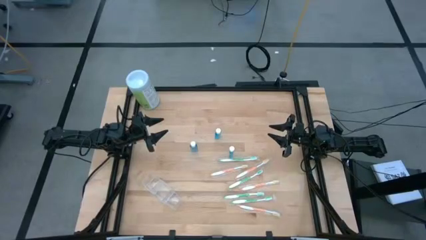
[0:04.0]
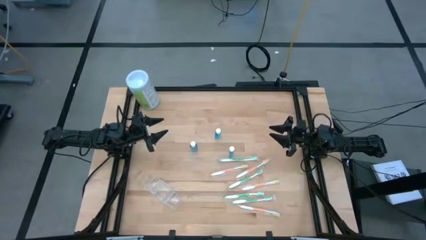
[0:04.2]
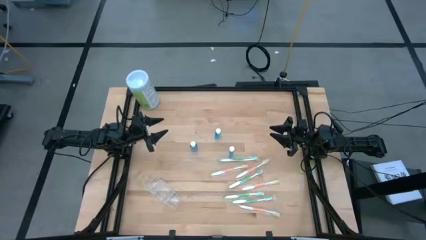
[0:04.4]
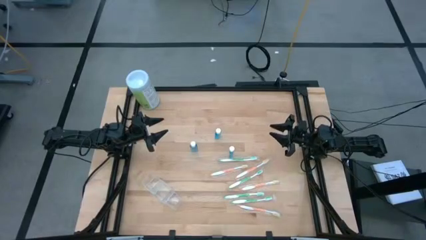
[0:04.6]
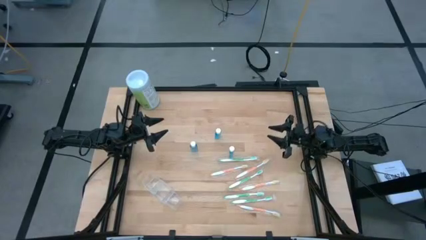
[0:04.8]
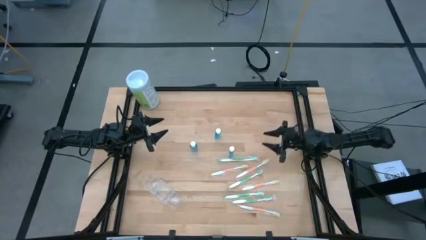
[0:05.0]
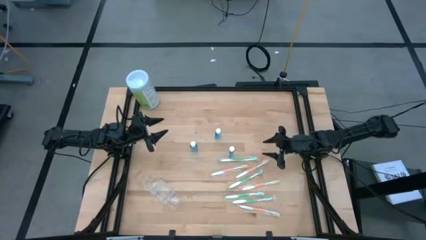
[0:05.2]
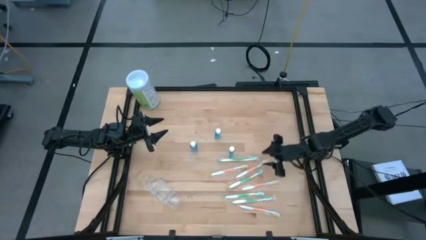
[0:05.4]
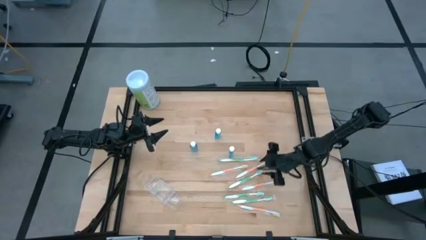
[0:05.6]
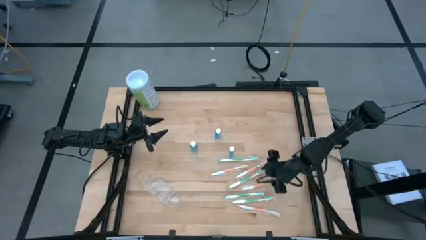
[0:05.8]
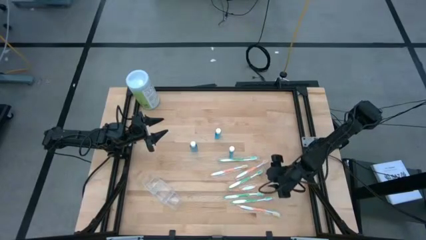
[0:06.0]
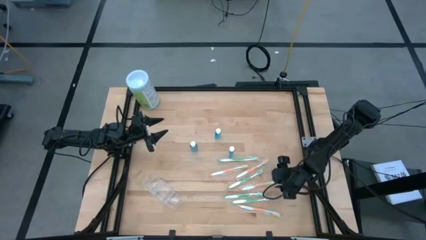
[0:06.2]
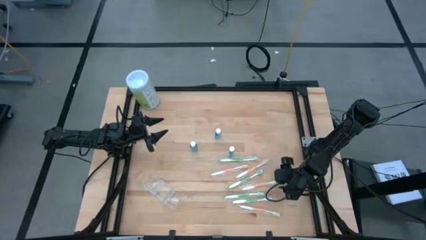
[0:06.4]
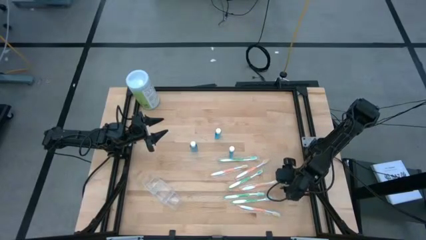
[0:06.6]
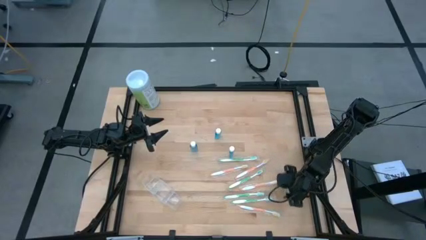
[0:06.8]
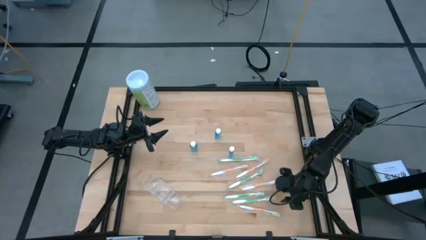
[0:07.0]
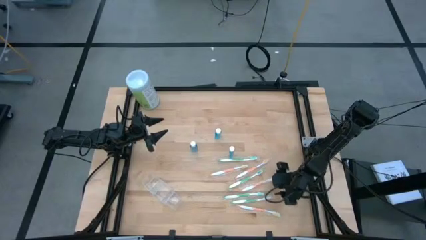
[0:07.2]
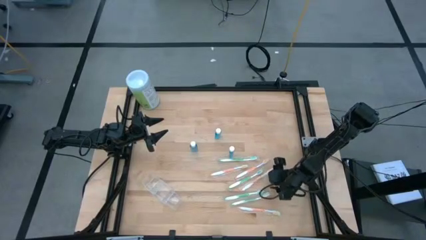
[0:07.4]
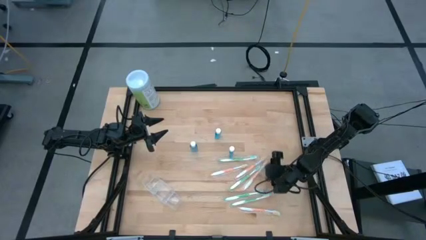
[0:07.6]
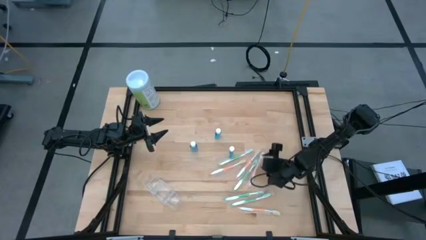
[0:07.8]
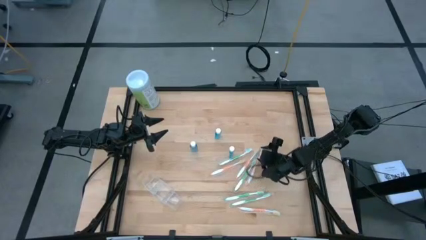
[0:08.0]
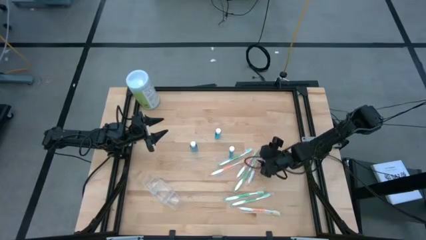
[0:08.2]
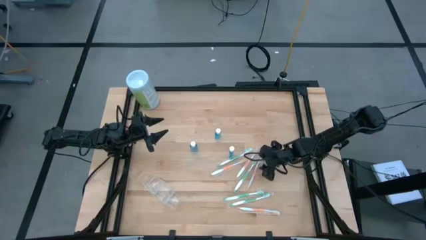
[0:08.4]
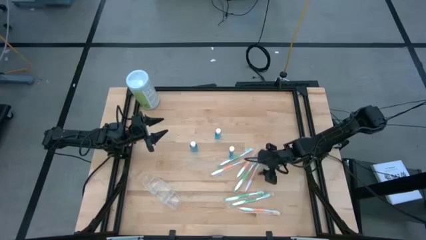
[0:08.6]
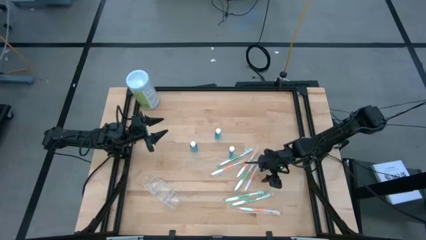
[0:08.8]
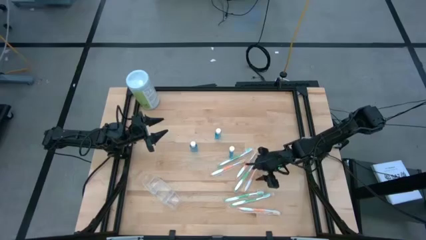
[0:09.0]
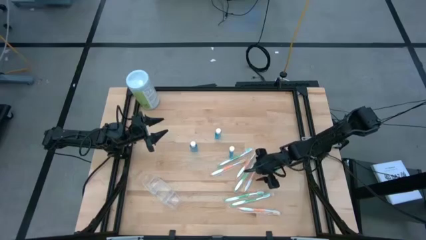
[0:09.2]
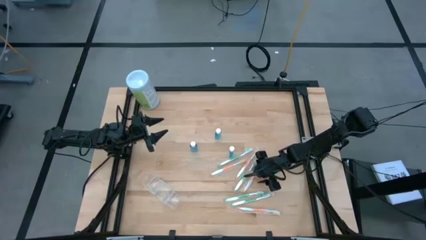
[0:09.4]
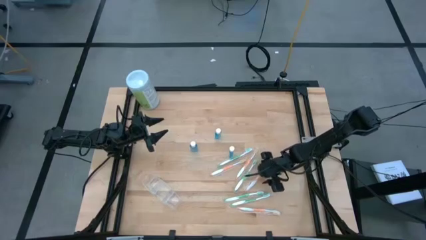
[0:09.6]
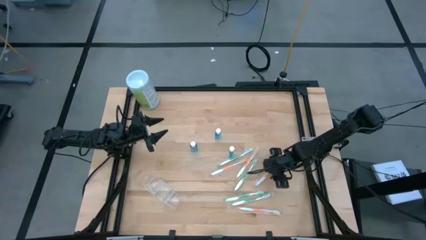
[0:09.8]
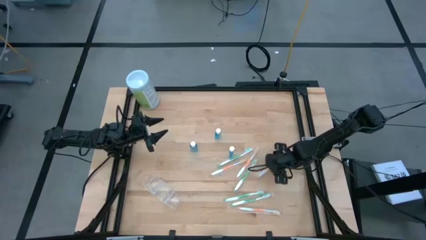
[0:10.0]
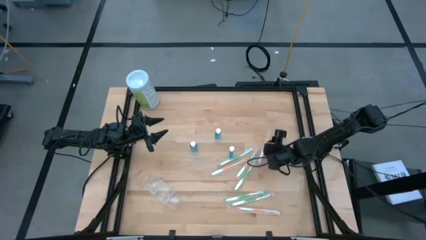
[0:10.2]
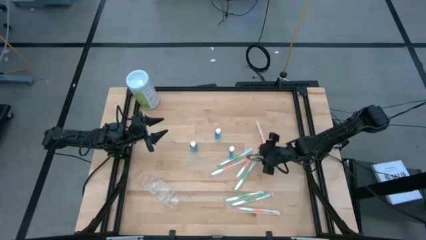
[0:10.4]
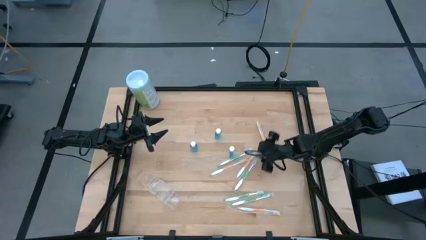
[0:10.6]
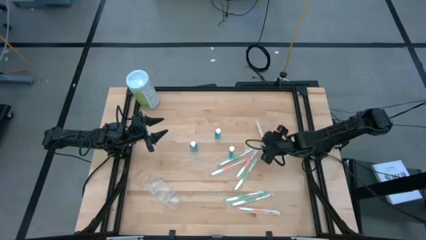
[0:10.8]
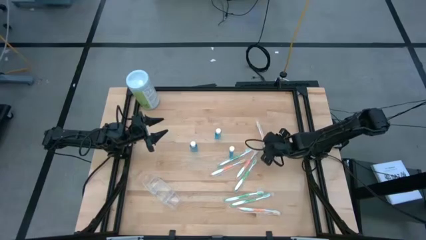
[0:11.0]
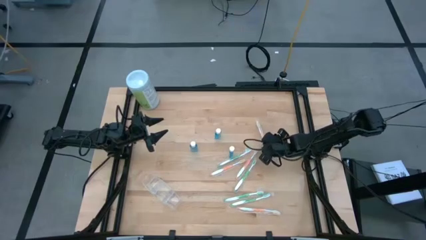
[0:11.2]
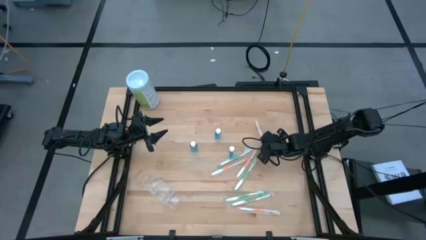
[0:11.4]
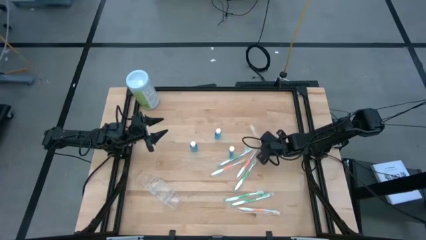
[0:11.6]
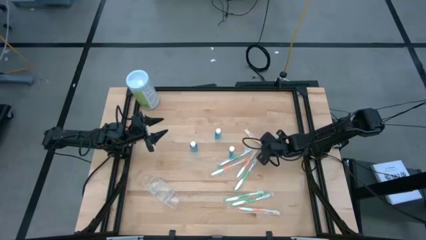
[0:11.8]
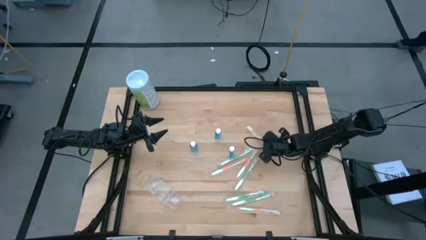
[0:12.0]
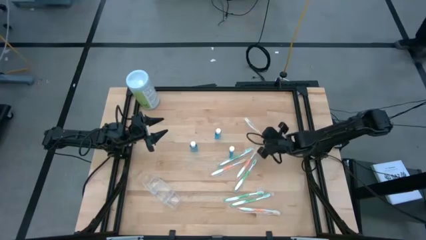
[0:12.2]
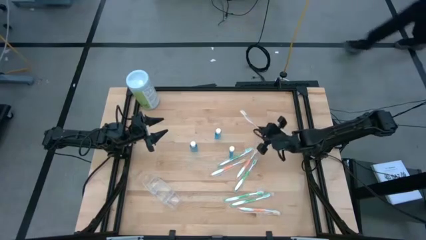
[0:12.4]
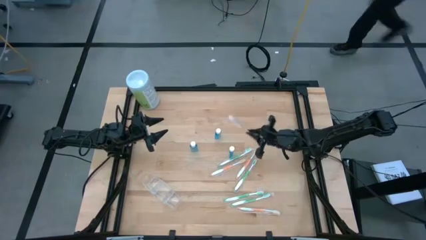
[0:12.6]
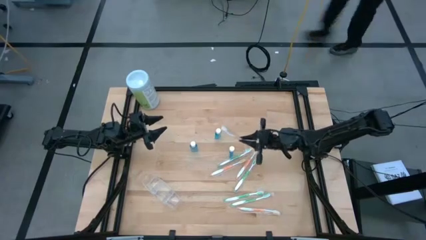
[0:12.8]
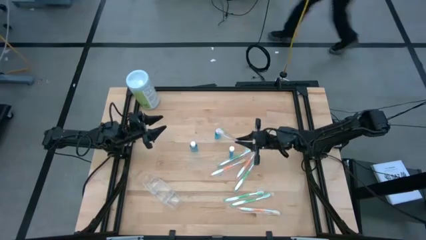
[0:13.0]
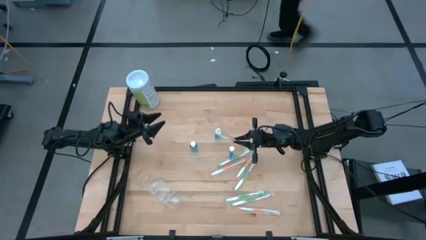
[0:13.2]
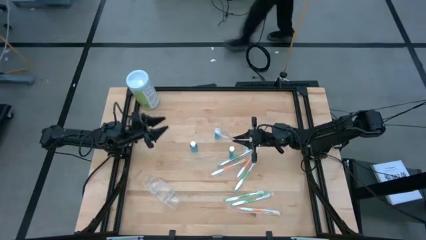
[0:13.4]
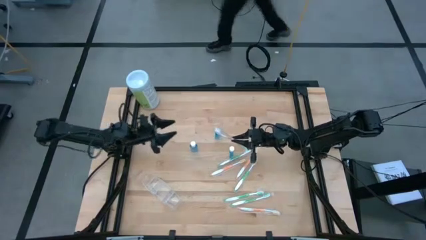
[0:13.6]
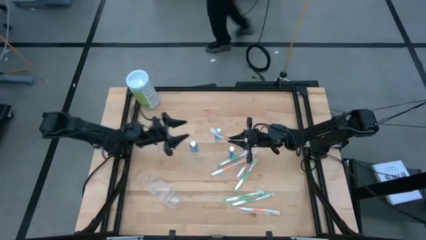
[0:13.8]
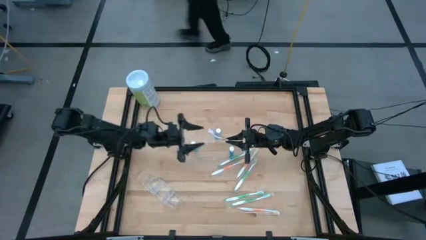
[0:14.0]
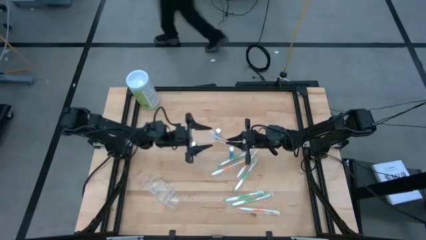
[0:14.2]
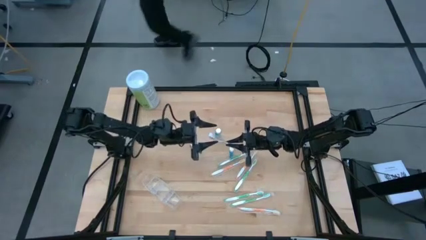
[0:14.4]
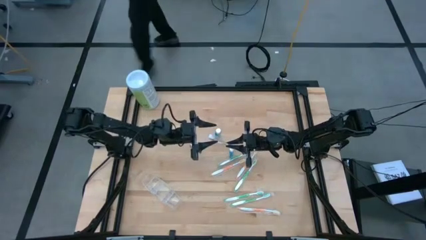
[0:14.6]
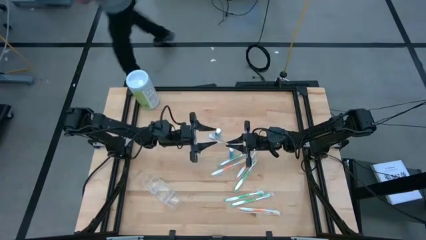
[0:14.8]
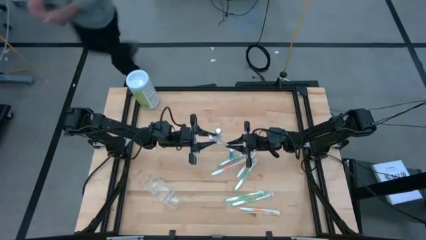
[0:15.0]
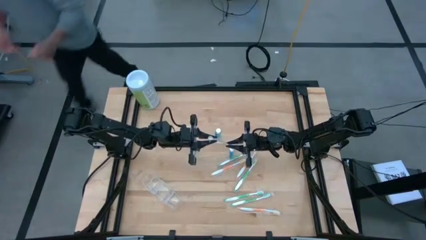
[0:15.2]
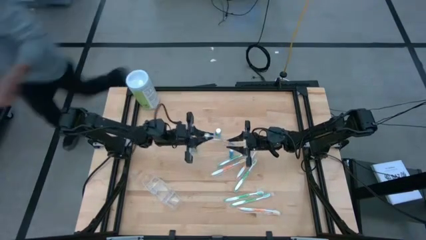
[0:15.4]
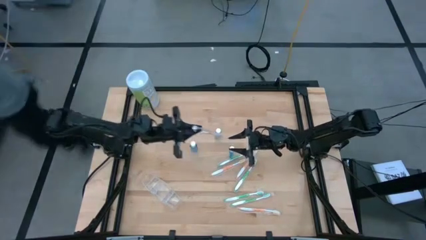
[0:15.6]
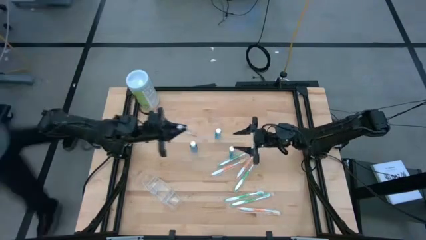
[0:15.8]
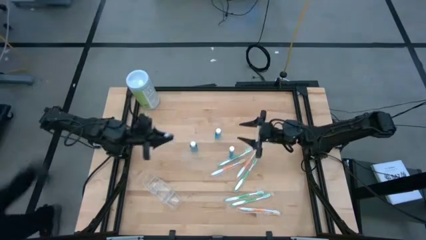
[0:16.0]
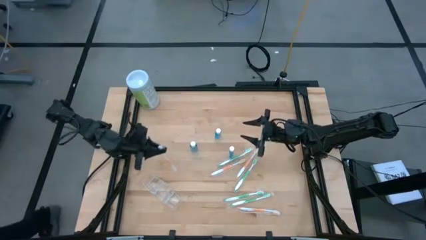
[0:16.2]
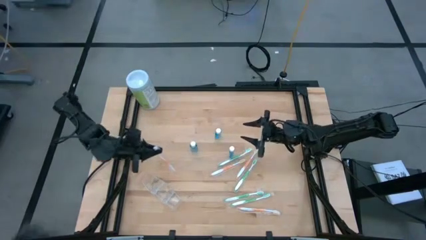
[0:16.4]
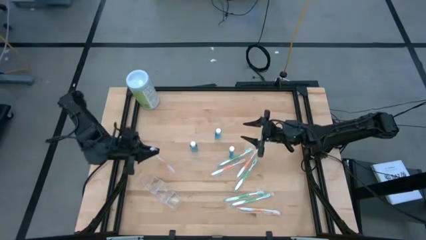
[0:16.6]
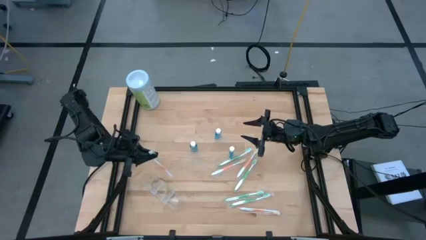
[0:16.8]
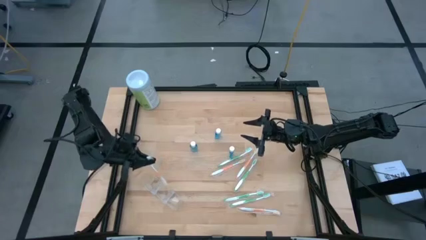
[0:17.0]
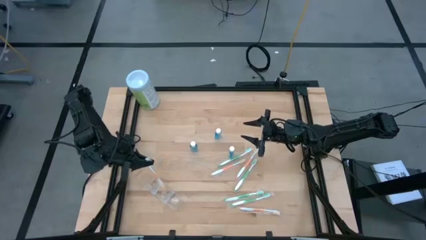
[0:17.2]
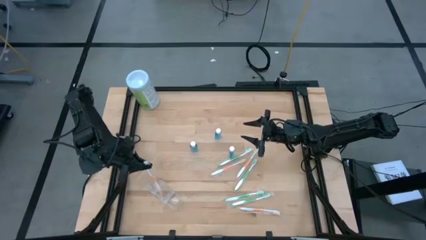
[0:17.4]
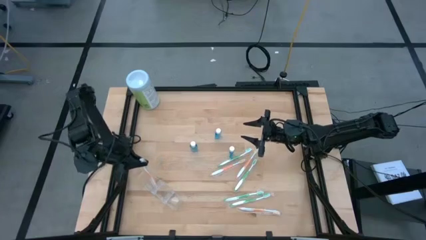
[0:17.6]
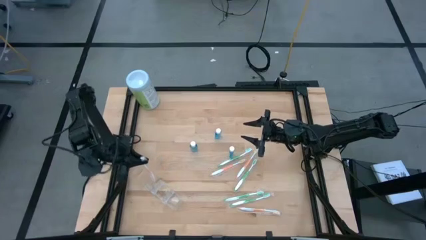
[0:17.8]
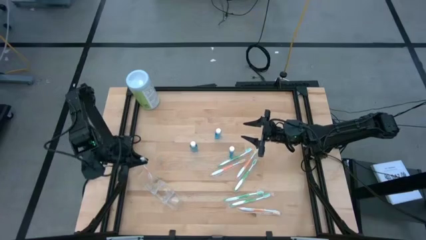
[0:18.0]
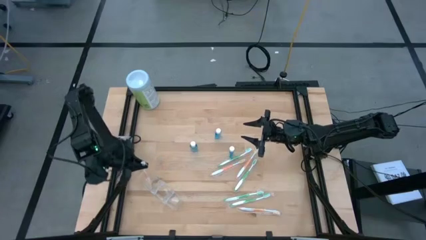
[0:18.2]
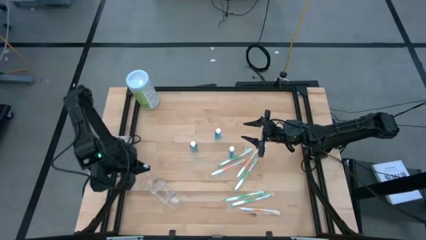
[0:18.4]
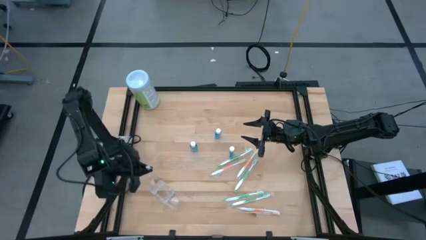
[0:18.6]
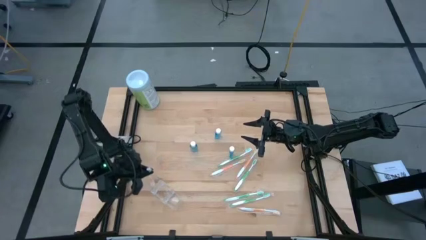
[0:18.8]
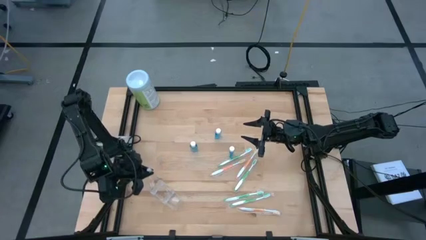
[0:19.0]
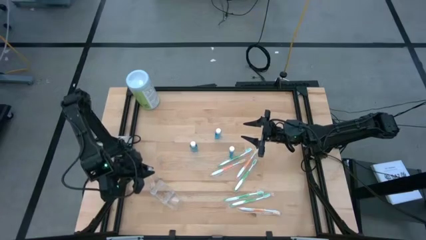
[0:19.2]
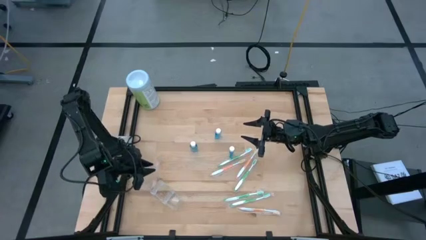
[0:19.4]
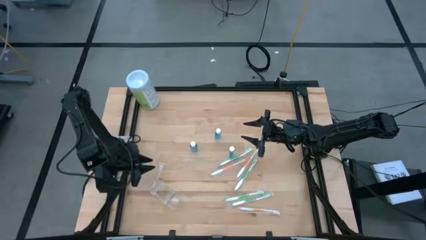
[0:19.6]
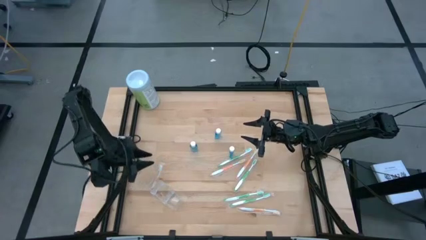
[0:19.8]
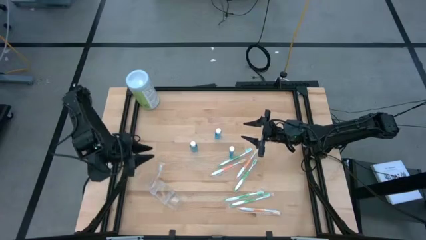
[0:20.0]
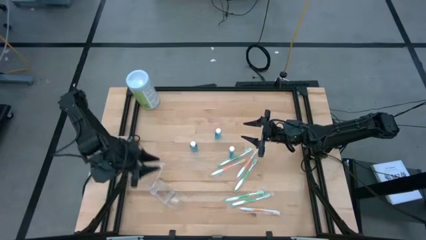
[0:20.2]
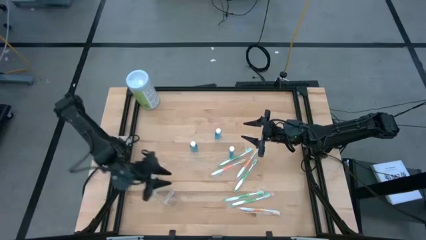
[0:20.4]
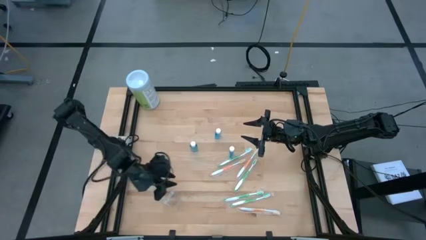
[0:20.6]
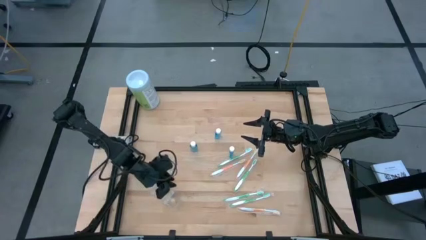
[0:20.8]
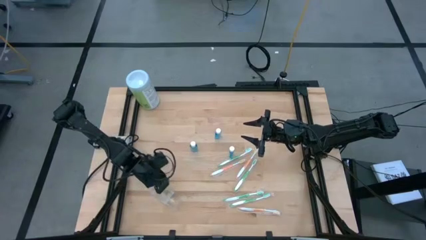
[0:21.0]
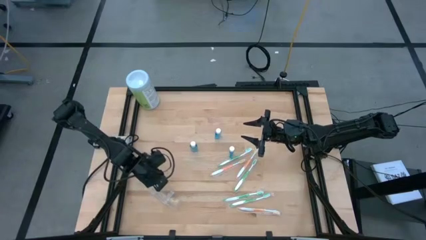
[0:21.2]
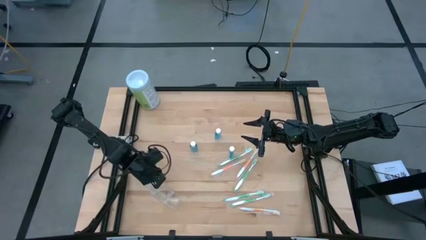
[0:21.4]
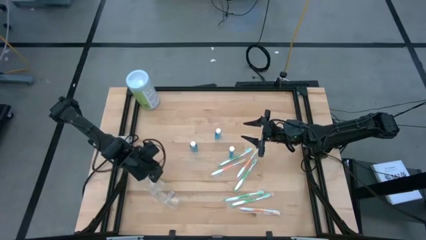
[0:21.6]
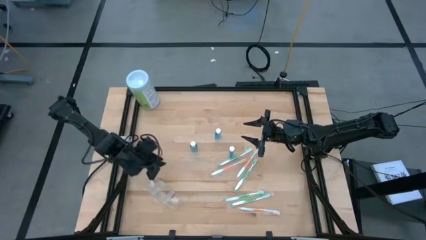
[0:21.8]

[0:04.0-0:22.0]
Task: Pick & Place toothbrushing station
Put the orange toothbrush into the transparent organizer
